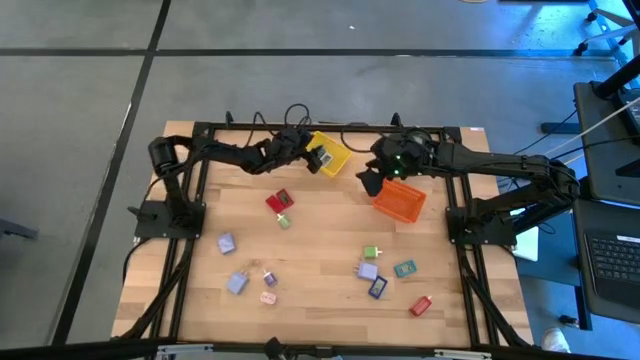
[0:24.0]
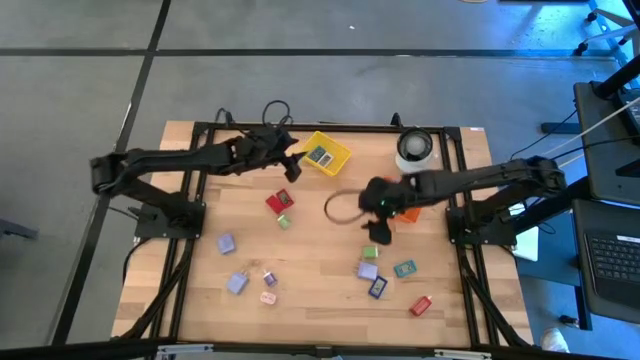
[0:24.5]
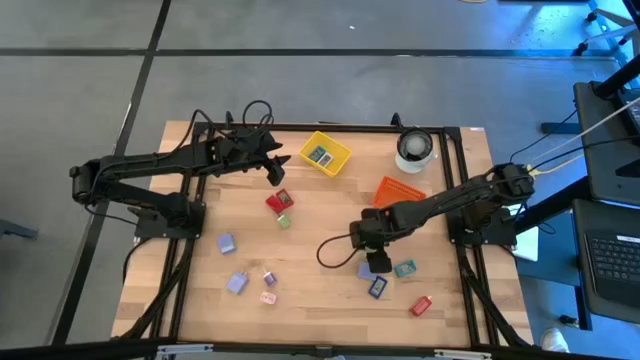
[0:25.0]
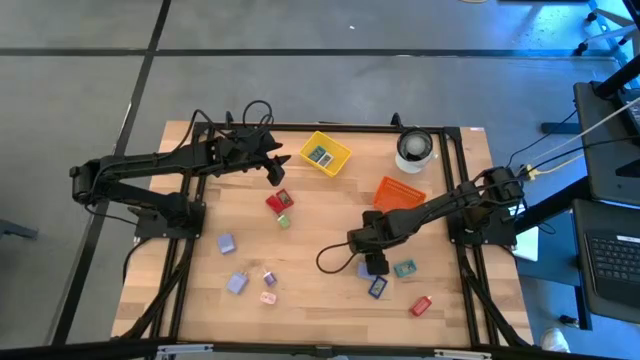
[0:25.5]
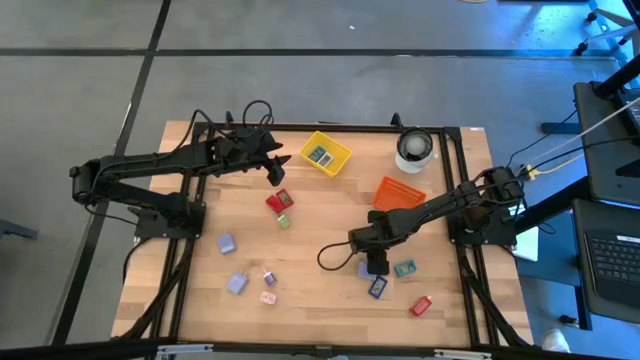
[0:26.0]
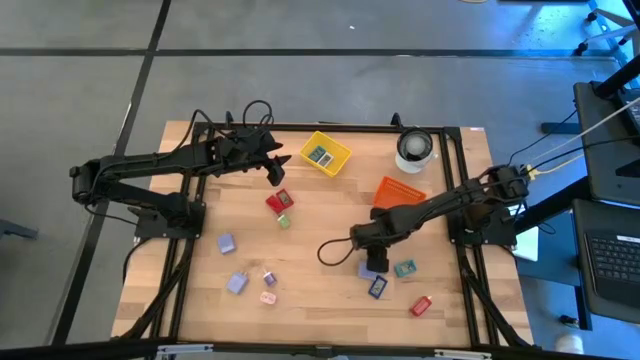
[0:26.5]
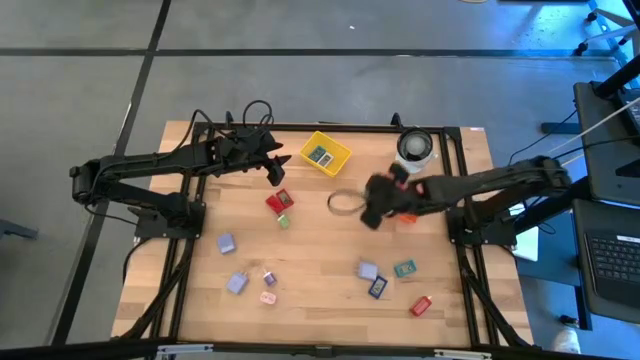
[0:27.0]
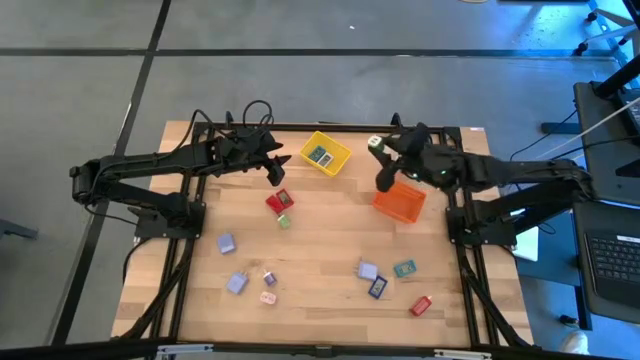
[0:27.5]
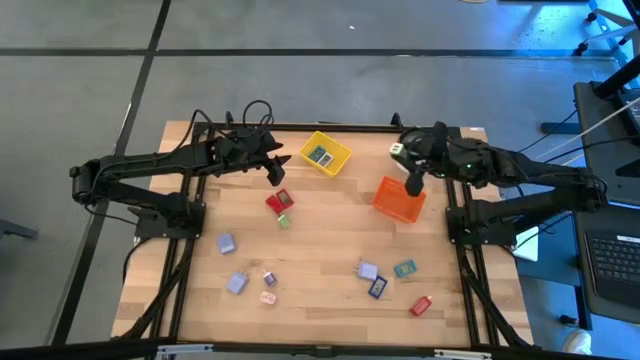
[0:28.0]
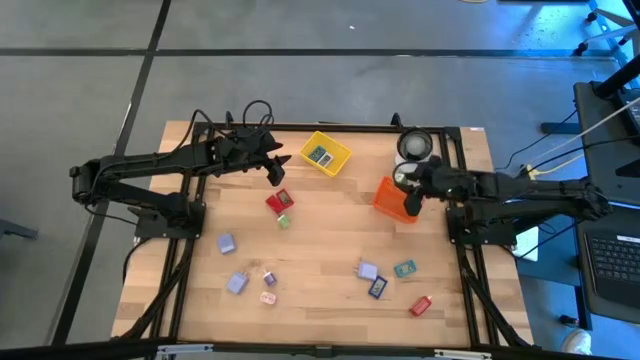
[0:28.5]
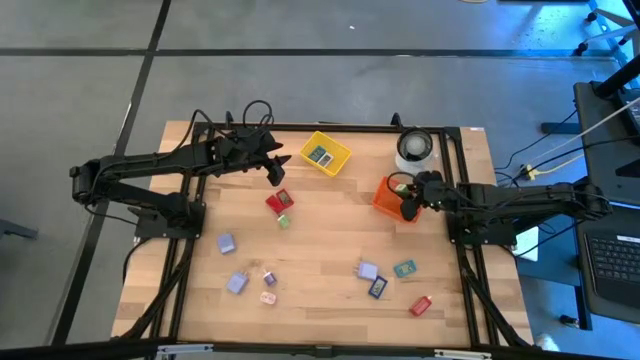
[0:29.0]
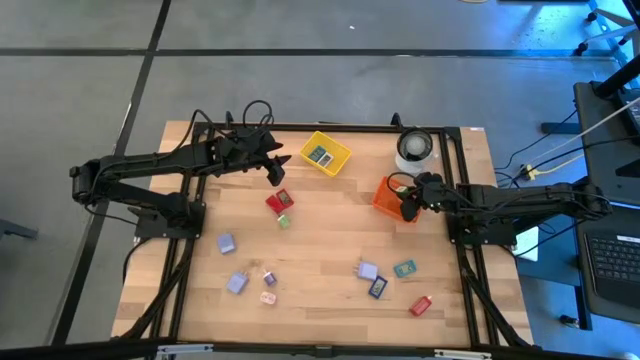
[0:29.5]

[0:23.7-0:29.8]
Task: Pick & Place Office items
Put the right green charger adapter into the orange bin

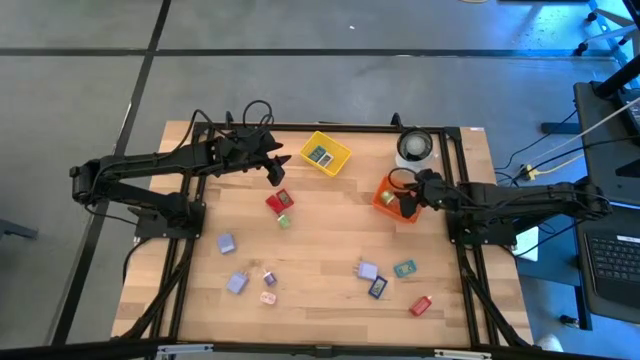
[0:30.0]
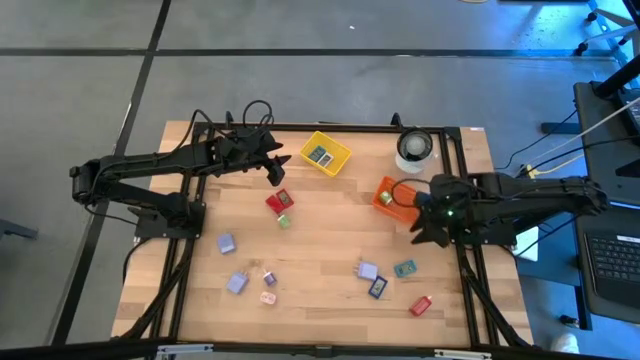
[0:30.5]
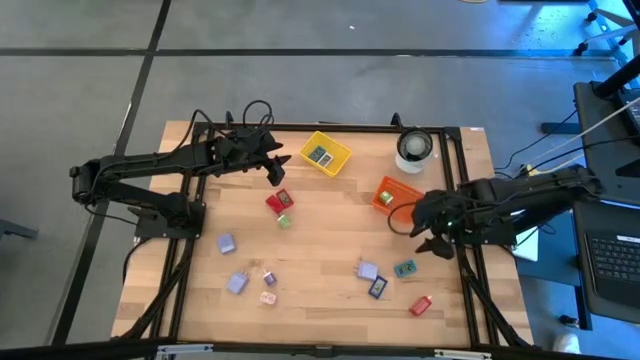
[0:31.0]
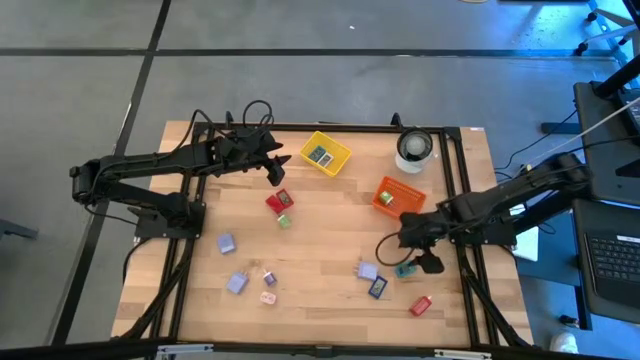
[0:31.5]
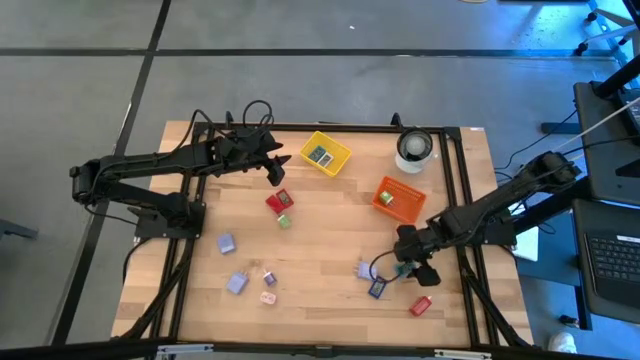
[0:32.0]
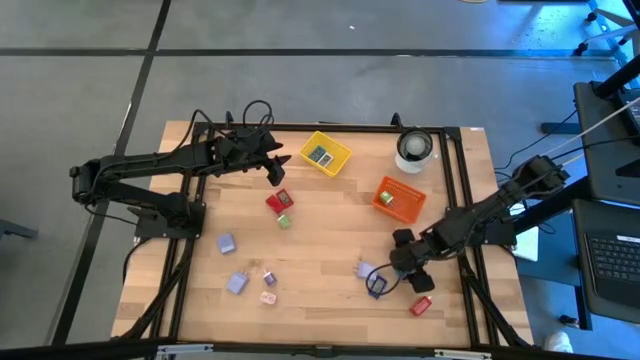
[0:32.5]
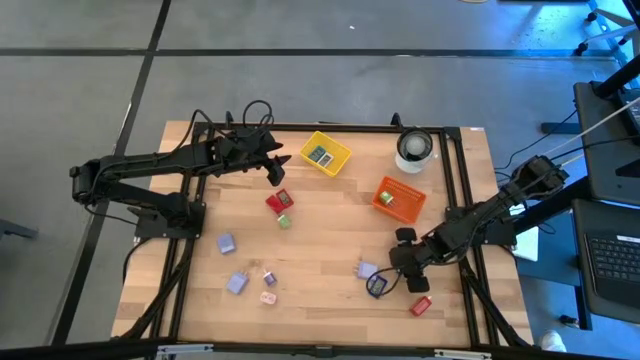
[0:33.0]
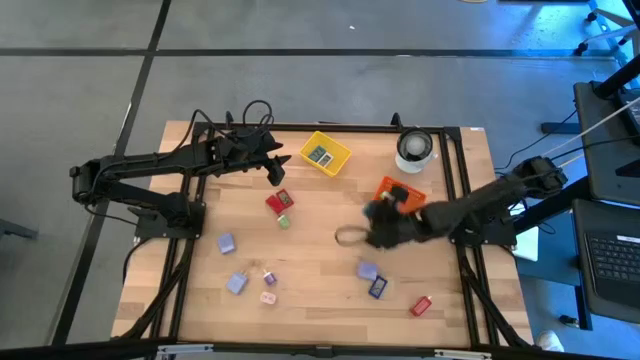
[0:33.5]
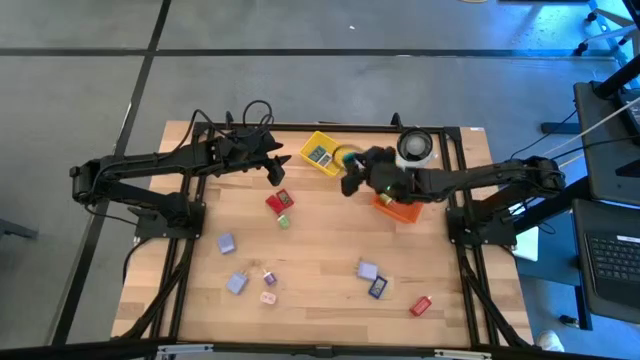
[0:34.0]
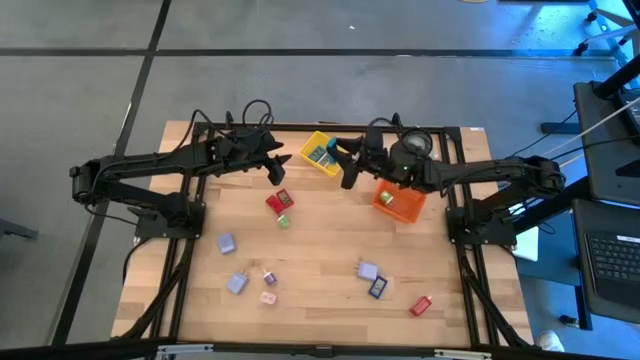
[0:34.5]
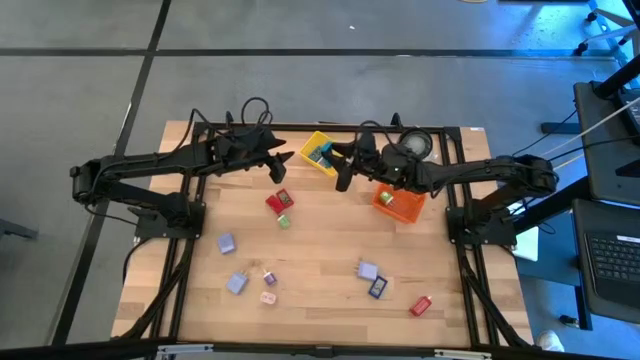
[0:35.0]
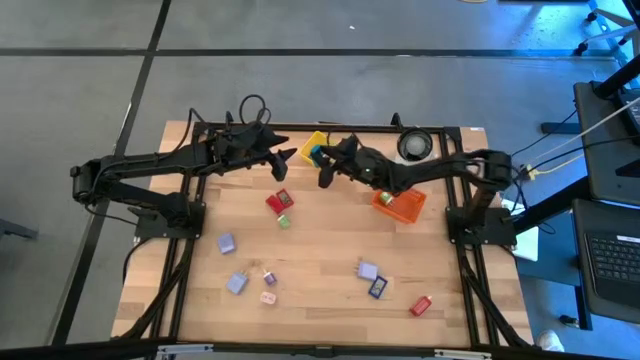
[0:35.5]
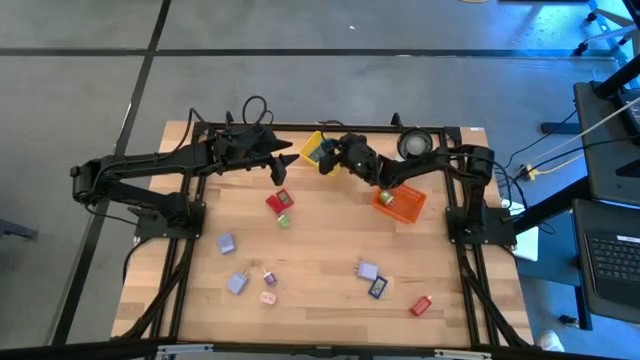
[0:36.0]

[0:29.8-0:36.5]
Put the light blue digital clock into the yellow bin

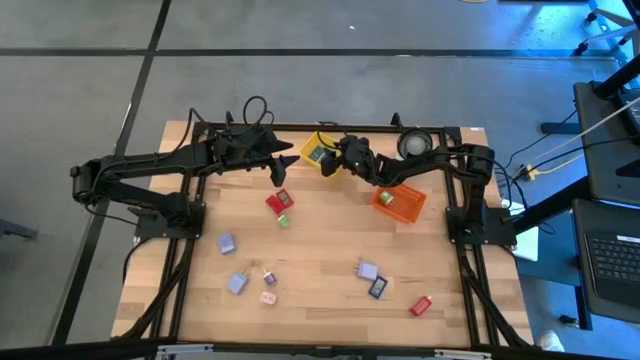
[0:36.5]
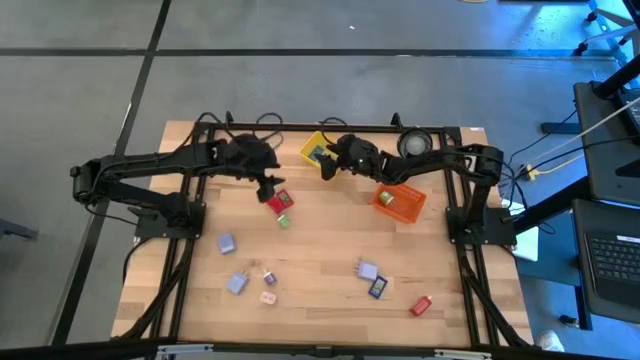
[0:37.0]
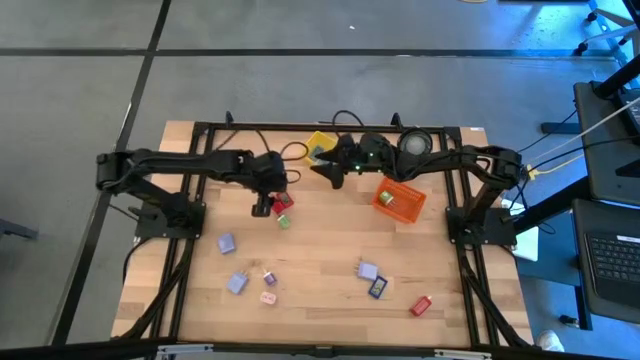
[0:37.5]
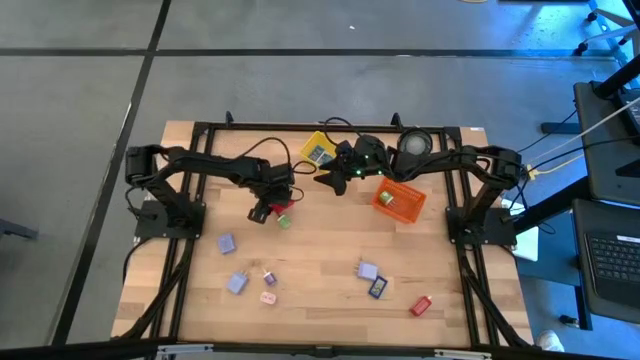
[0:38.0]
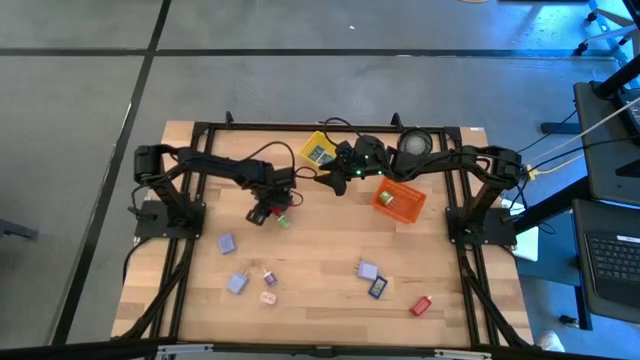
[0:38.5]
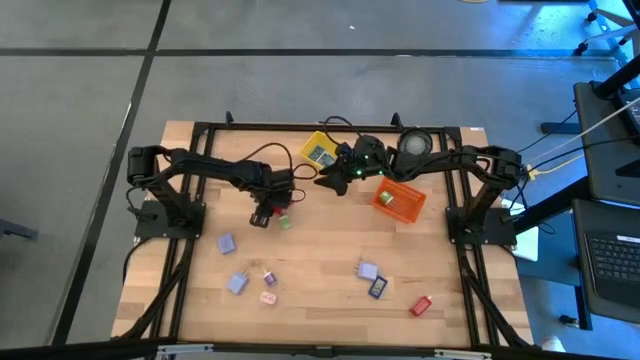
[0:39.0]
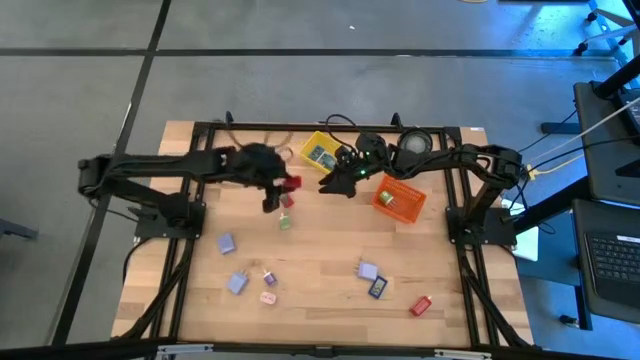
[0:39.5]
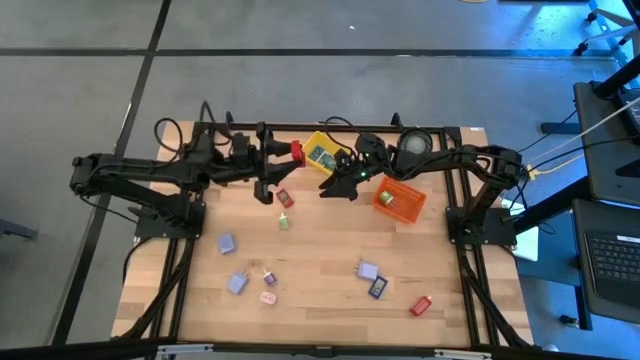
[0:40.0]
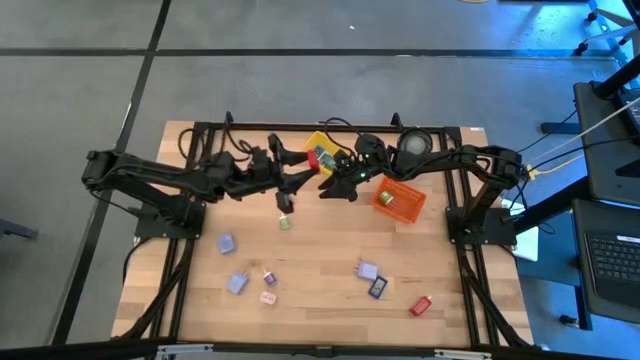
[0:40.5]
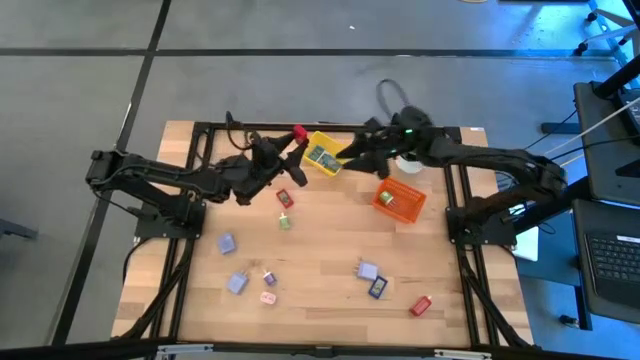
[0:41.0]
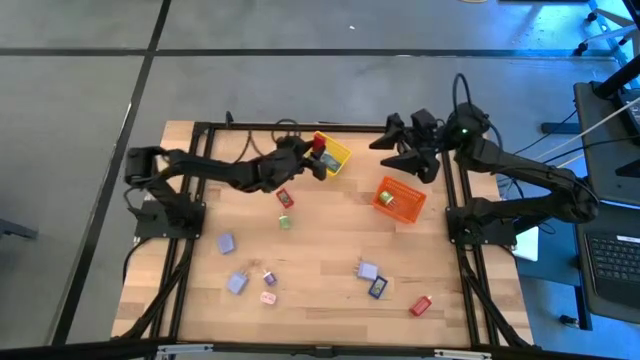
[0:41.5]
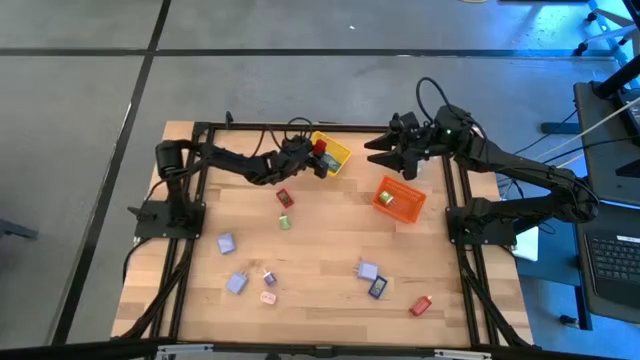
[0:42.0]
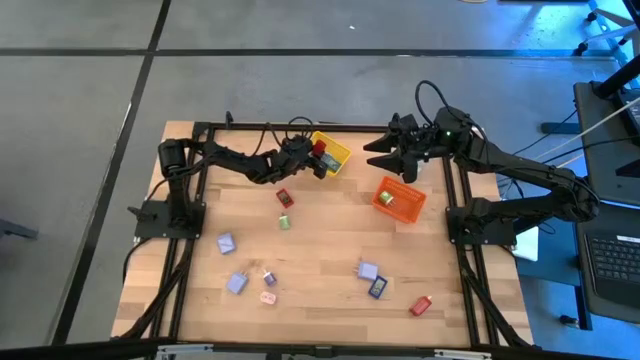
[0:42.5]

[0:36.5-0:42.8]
Put the left red digital clock into the yellow bin

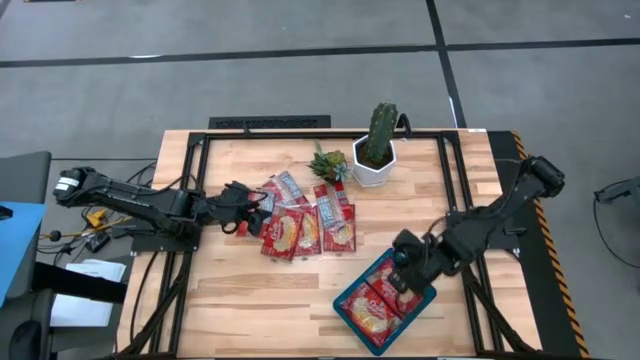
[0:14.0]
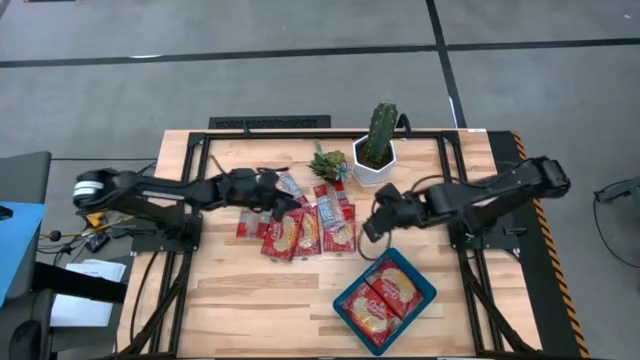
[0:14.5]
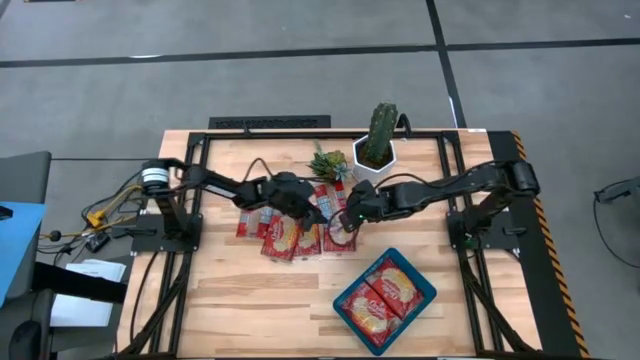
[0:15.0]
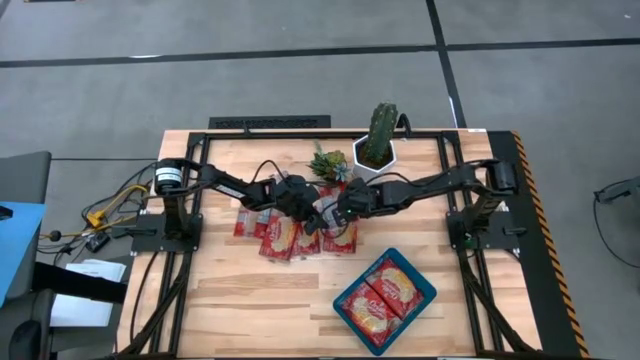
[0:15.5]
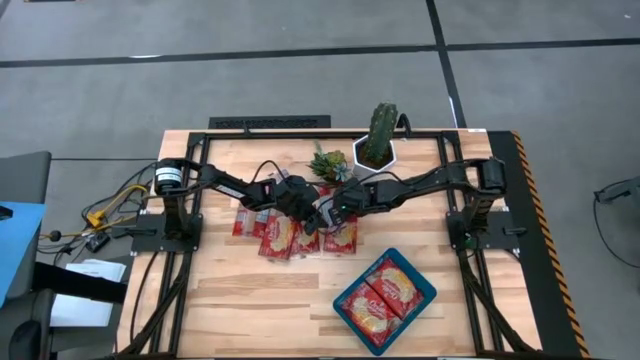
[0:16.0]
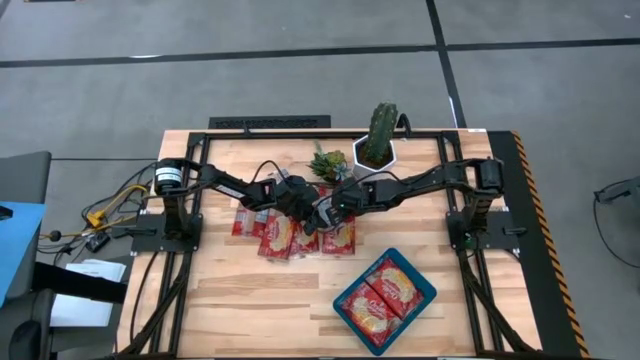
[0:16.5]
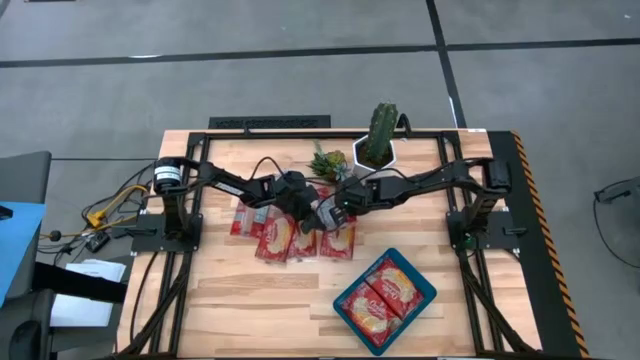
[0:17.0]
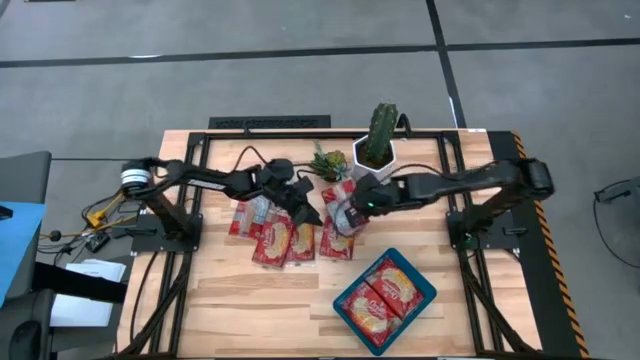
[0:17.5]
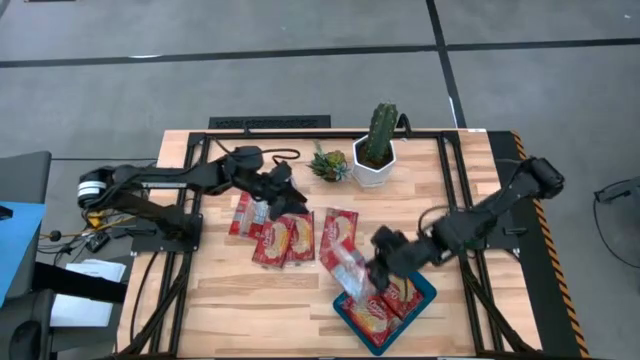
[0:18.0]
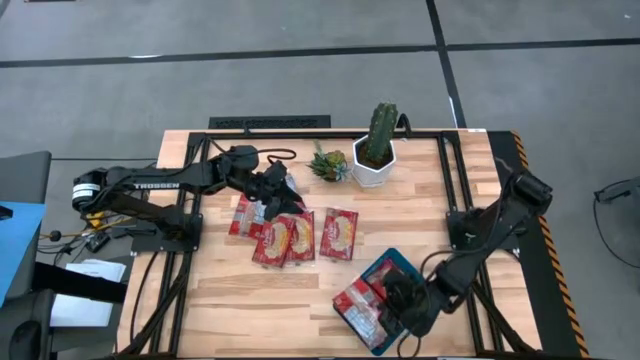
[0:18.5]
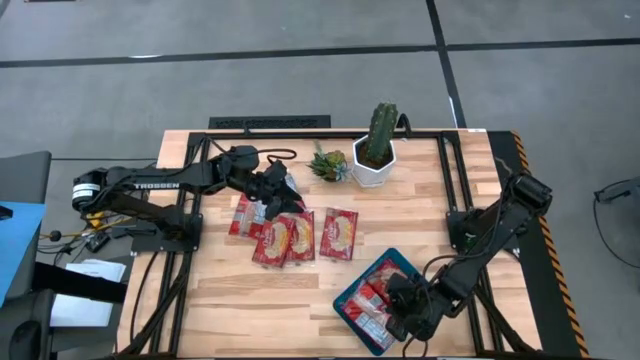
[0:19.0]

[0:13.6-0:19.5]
Task: Sort popcorn bags into baskets
Put the popcorn bag into the bin
